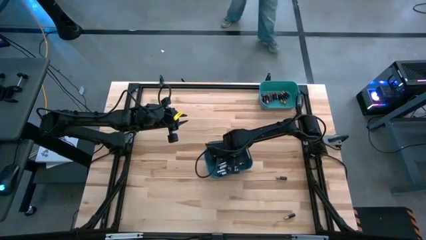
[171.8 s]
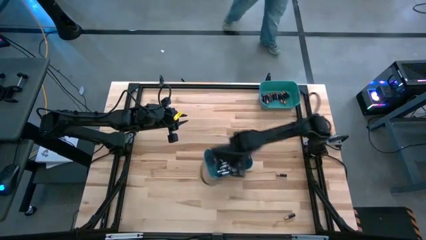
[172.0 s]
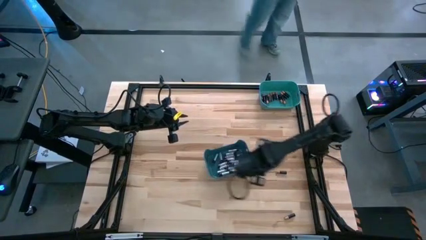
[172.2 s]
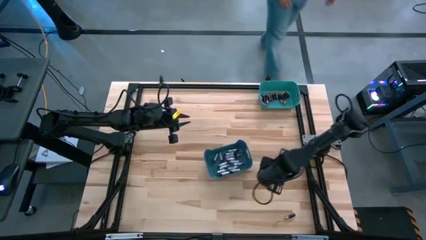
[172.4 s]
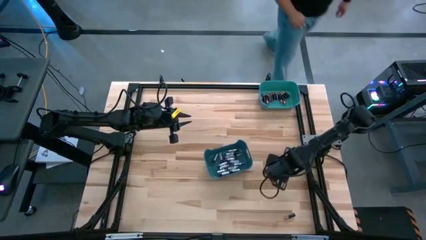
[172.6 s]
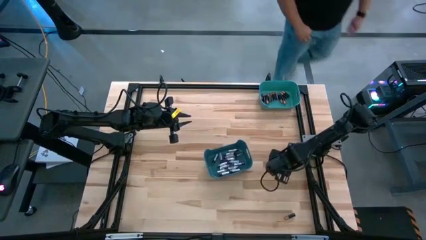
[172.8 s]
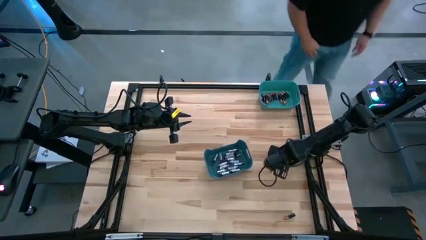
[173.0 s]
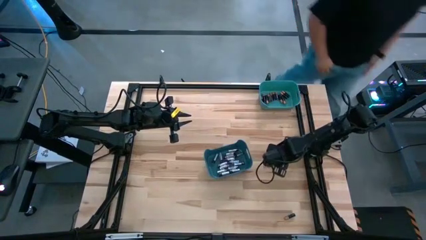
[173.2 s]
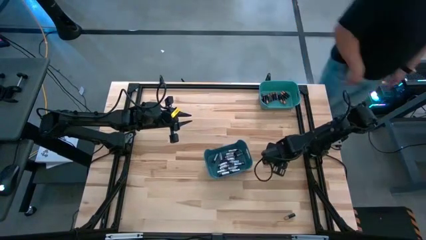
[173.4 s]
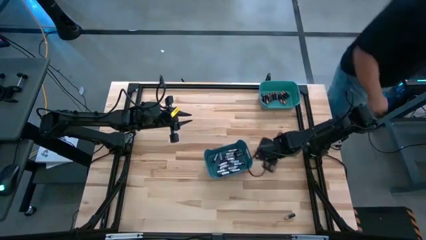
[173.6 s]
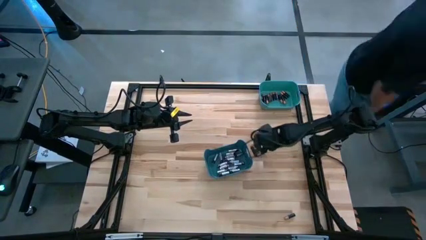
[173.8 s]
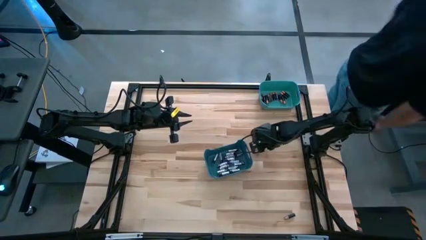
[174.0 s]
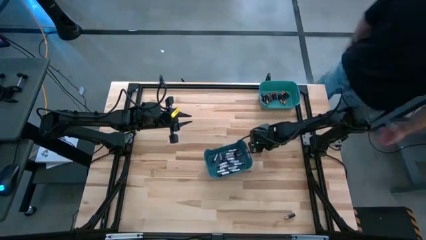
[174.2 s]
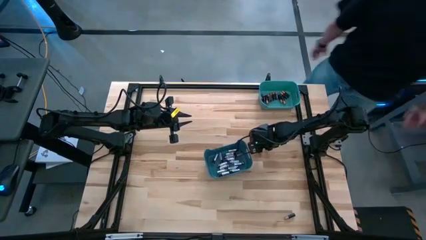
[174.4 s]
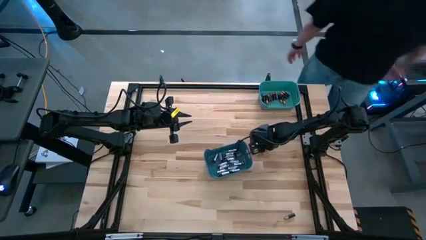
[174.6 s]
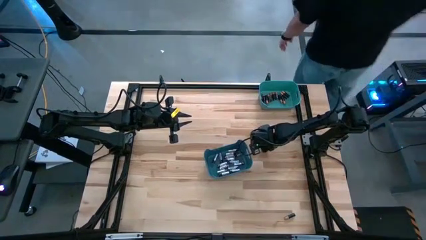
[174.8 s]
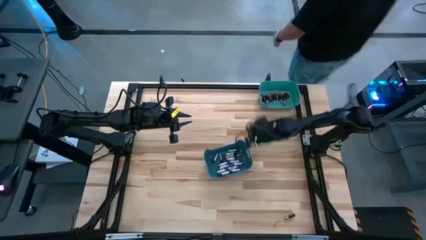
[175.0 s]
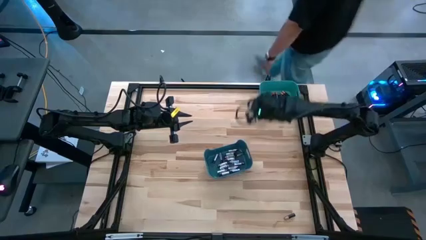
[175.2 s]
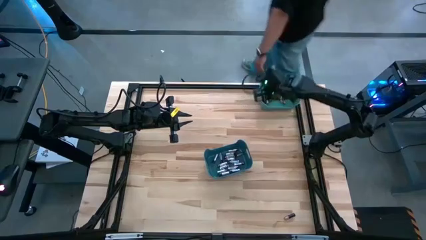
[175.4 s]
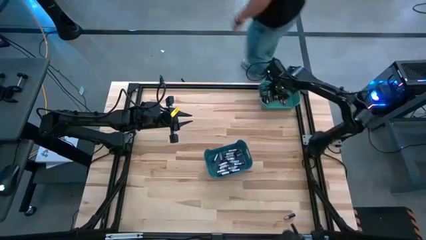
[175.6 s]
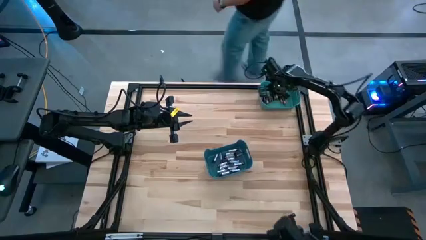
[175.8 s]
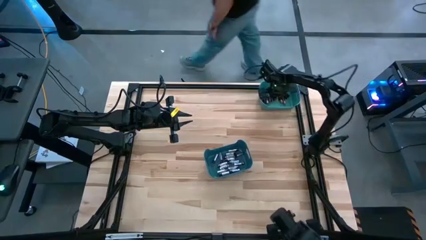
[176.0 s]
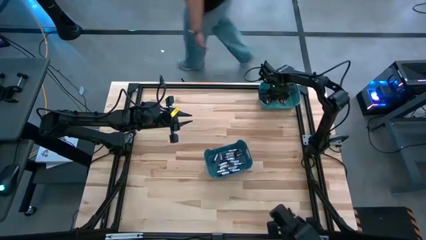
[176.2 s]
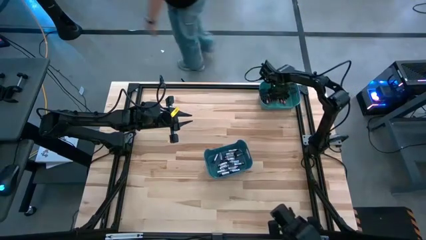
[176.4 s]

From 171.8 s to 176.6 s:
Task: Sort batteries
Put the black battery into the green bin

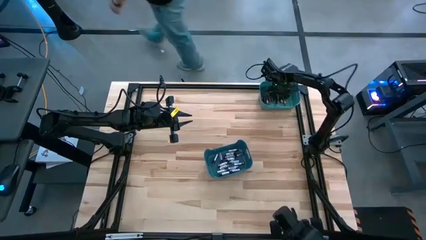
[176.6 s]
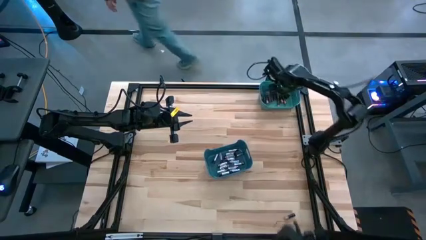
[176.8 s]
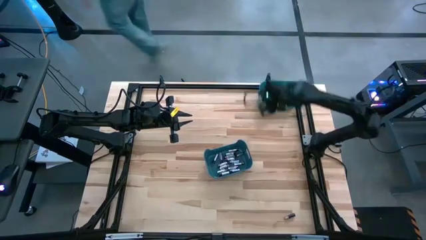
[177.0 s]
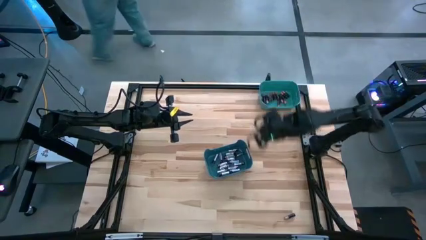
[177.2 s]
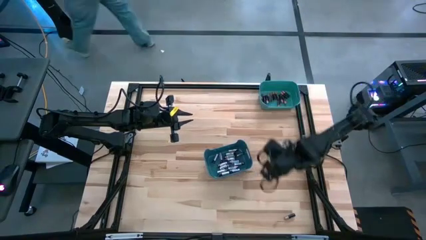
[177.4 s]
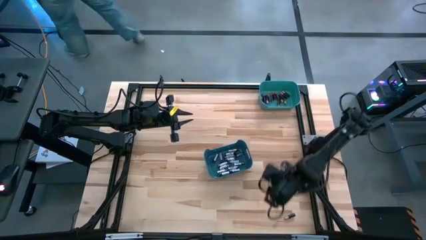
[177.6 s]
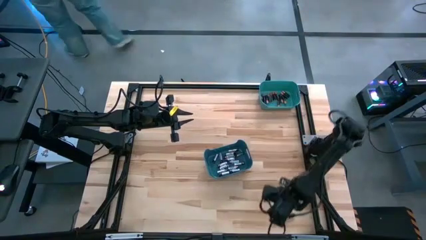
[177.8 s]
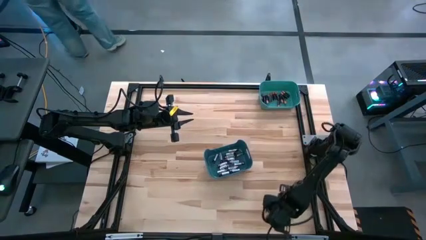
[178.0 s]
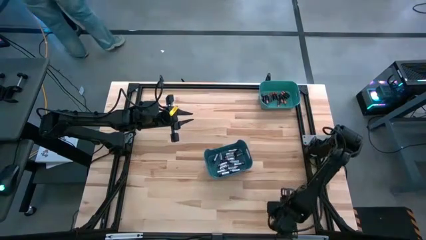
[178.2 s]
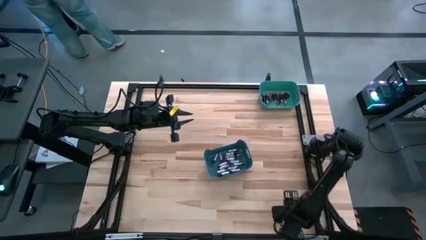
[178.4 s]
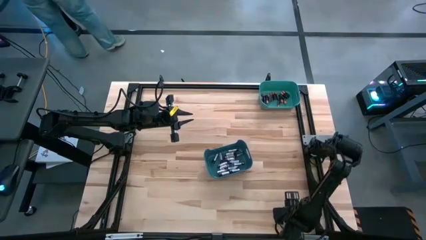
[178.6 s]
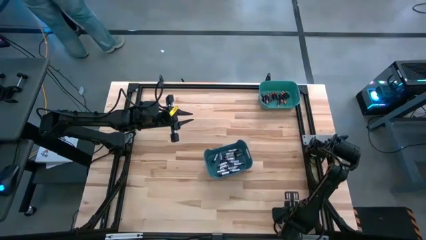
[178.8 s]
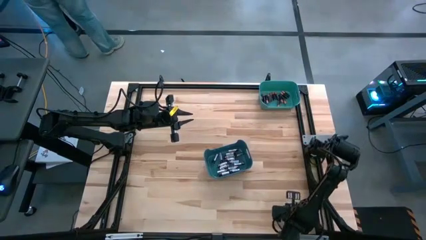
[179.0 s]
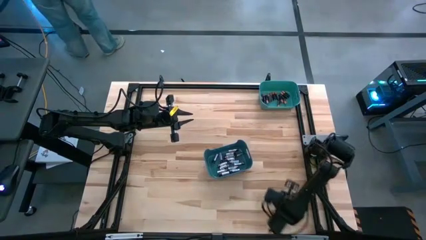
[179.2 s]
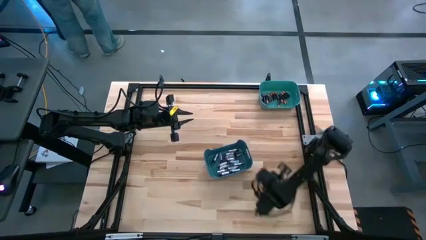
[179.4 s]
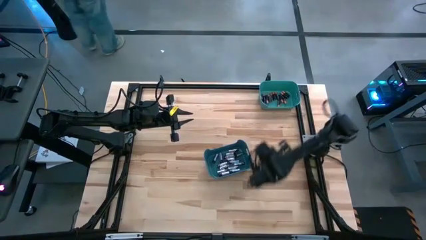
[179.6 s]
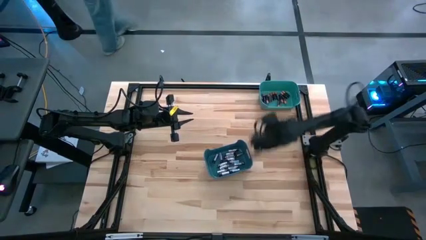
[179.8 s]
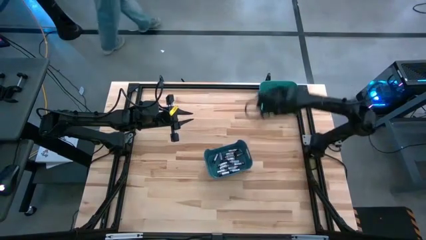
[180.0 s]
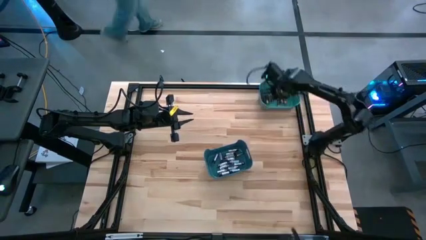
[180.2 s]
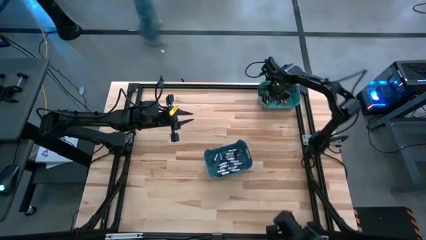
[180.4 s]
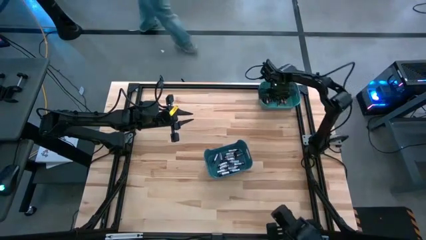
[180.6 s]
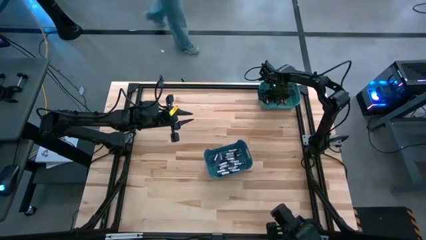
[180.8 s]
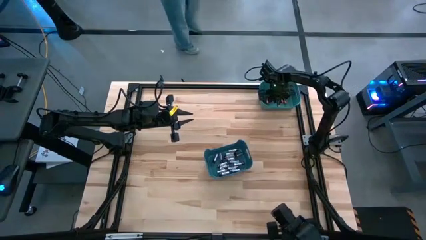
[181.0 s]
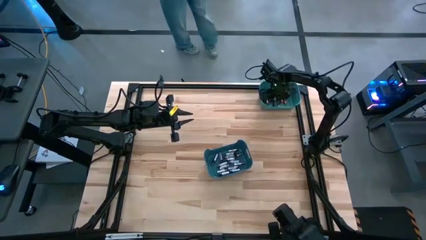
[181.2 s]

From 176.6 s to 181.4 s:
Put the black battery into the green bin

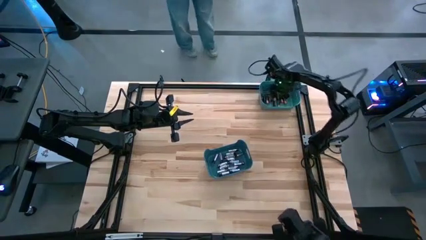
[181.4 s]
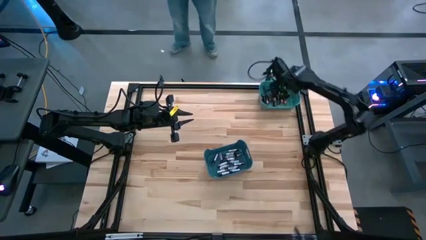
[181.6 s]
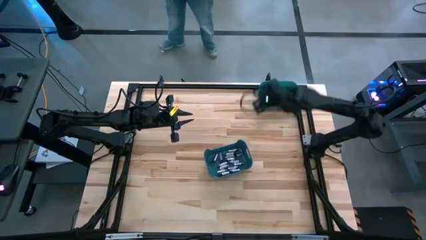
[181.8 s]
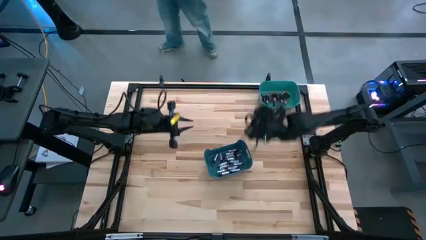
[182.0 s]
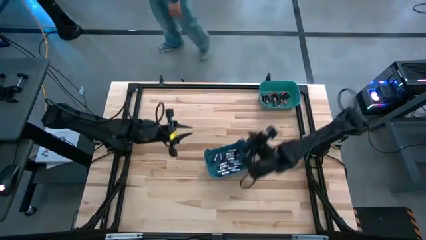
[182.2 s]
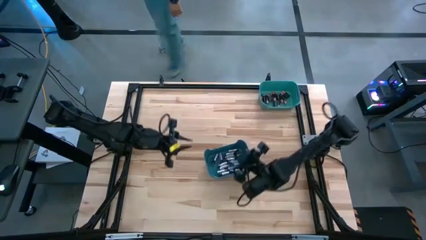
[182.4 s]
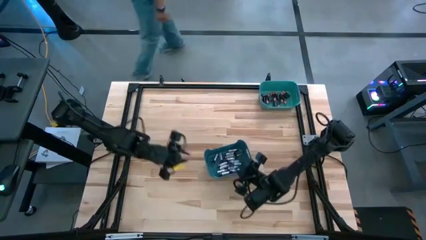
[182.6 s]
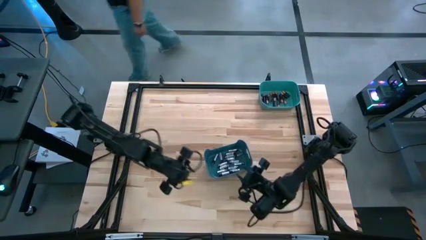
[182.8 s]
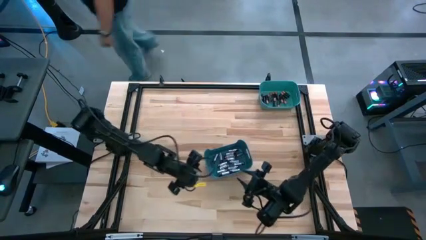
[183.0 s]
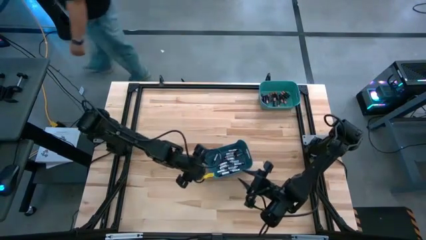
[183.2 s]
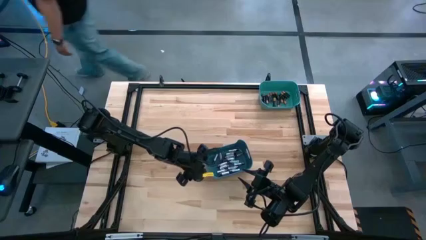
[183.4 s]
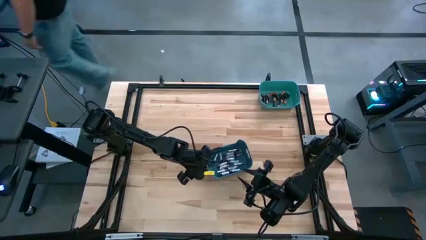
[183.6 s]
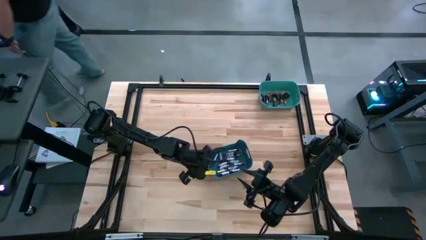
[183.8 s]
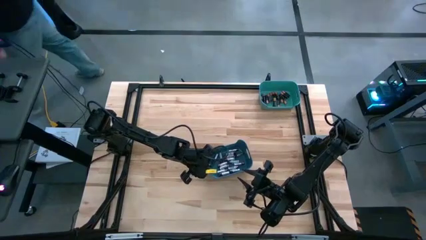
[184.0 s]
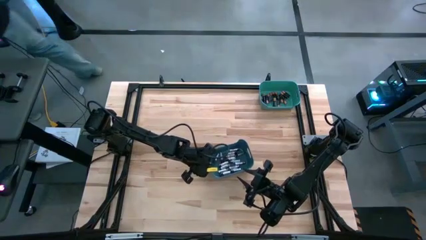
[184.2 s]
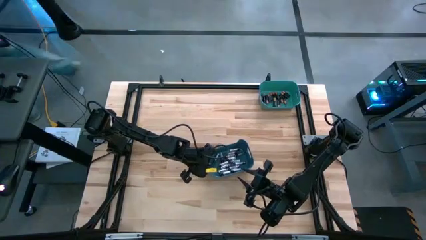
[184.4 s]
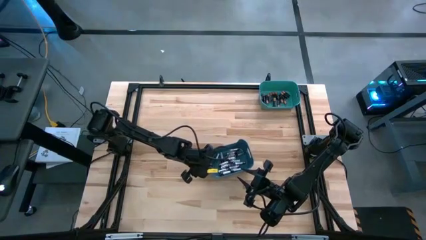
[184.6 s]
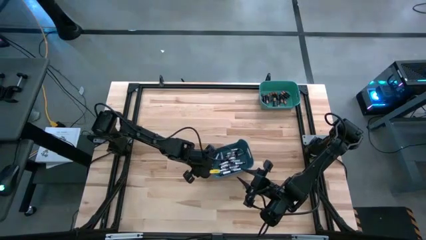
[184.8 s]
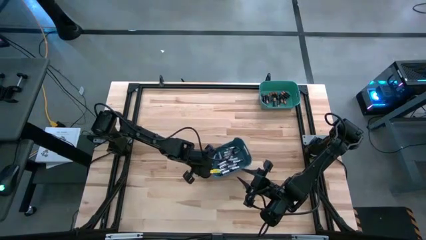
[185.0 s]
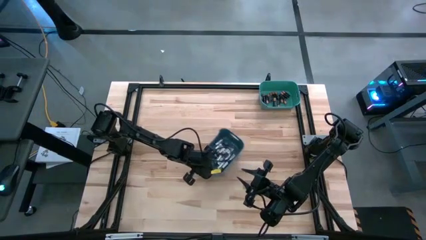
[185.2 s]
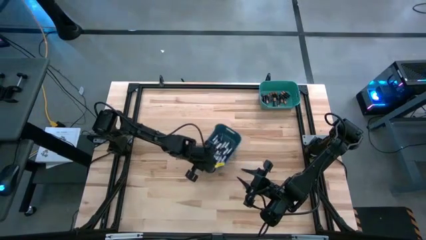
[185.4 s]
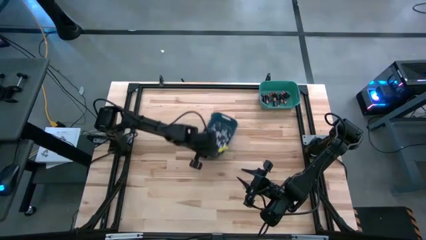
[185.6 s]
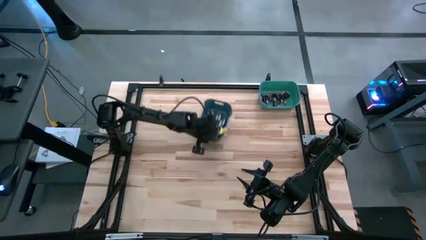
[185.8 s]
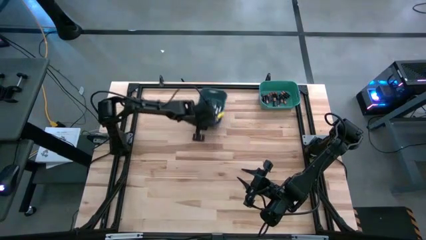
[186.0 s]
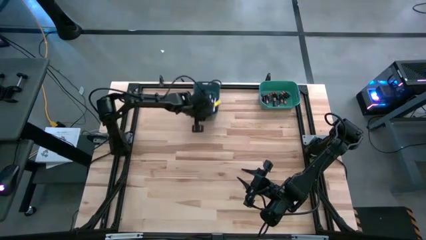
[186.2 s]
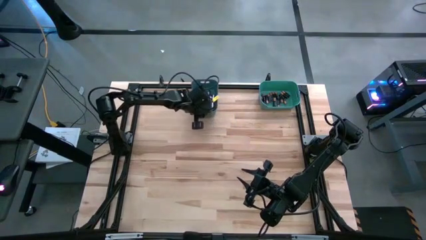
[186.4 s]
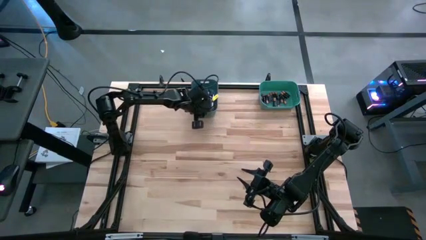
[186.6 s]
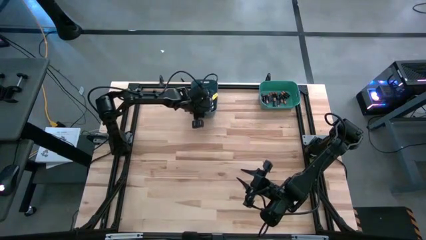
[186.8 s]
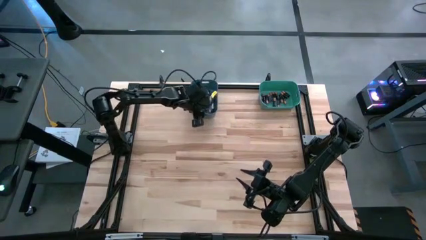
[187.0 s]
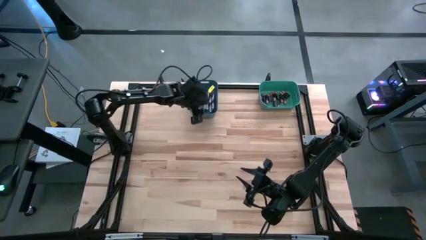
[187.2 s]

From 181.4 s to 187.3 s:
Move the blue bin to the top of the table

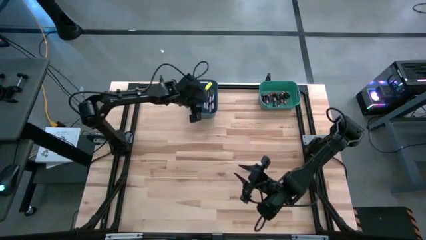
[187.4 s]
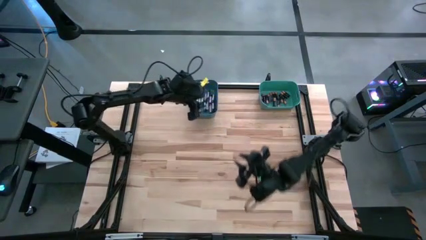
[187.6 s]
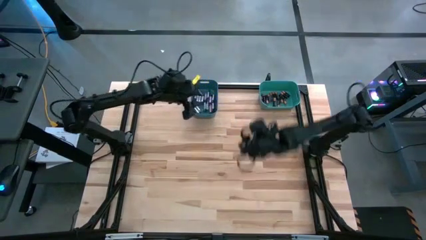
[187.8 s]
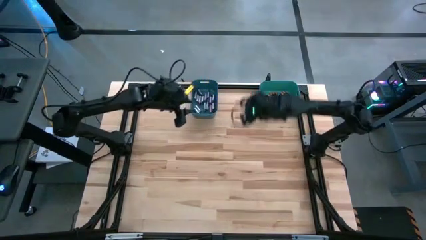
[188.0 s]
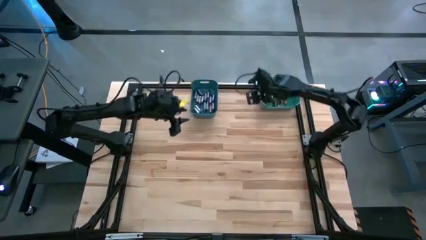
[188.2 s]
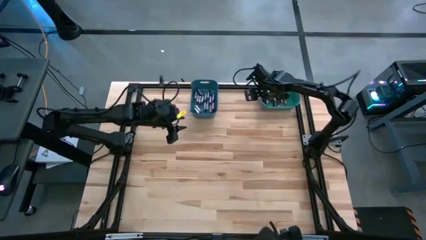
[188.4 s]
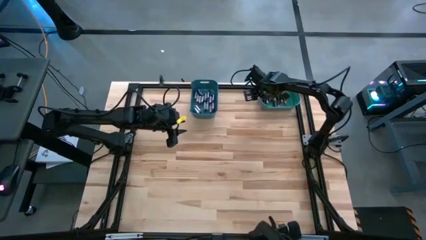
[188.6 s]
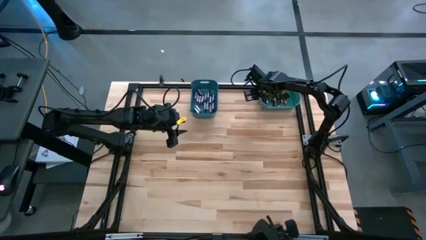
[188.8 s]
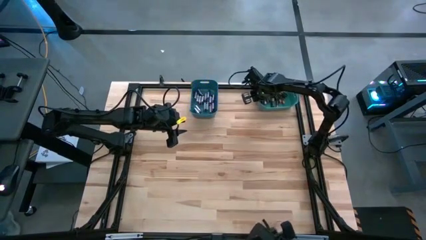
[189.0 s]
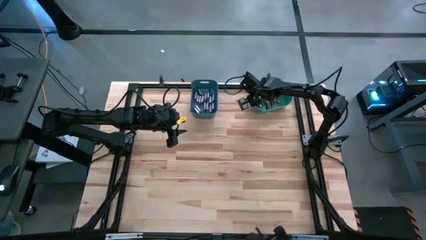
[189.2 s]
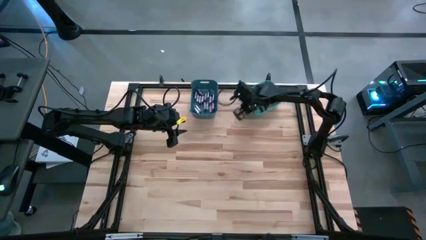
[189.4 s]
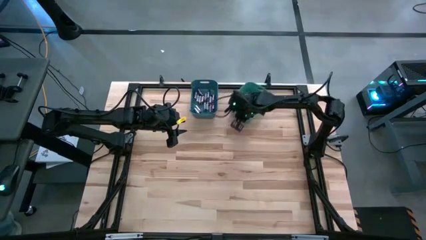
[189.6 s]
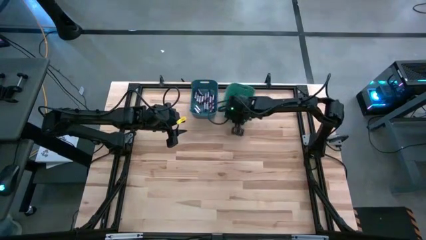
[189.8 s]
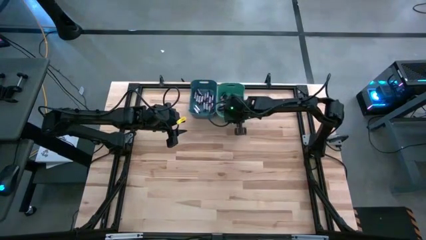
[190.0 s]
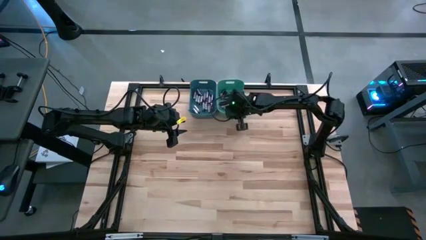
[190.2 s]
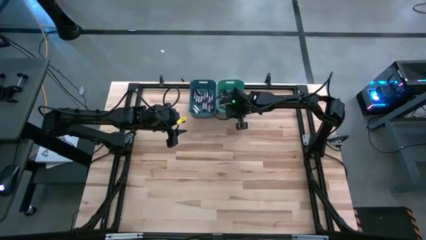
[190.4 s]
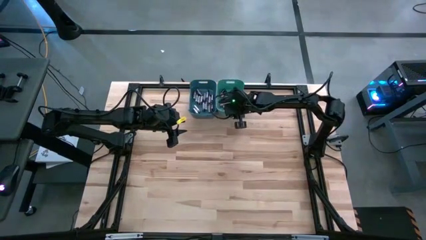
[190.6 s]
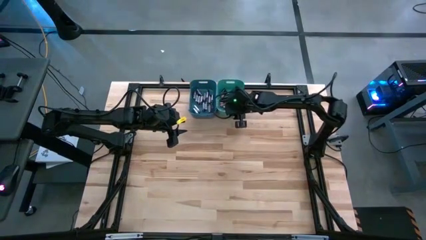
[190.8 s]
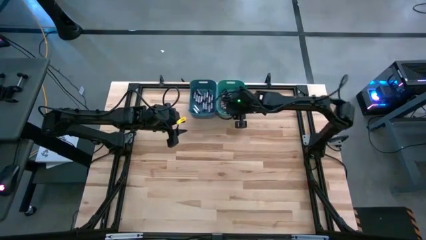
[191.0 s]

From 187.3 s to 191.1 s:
Move the green bin to the right side of the blue bin
